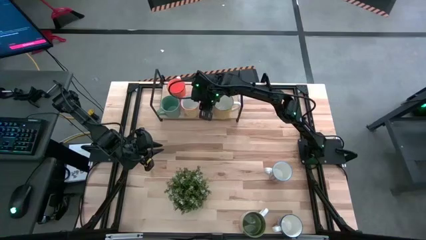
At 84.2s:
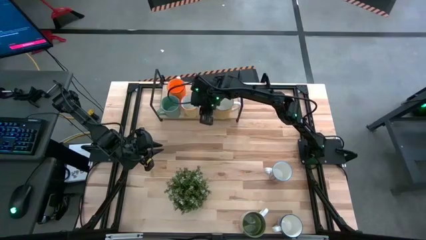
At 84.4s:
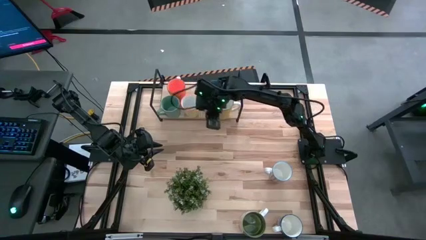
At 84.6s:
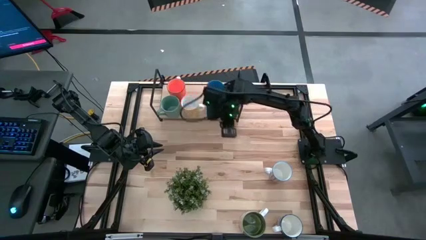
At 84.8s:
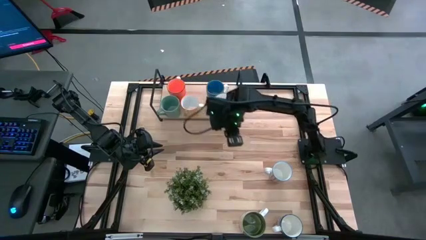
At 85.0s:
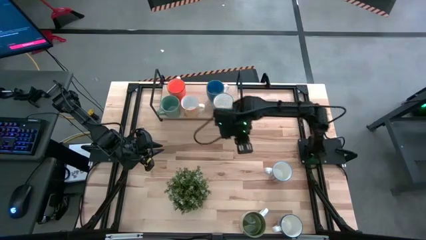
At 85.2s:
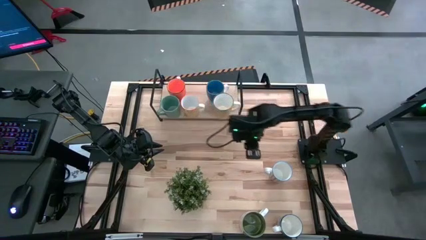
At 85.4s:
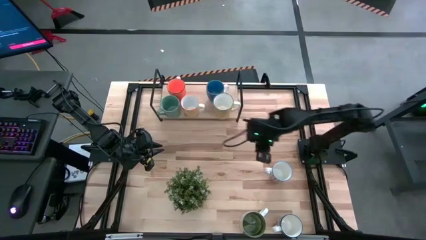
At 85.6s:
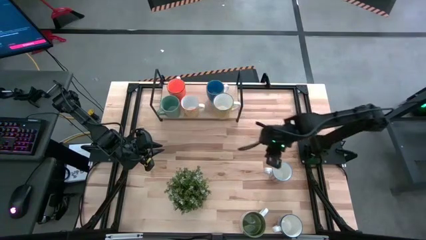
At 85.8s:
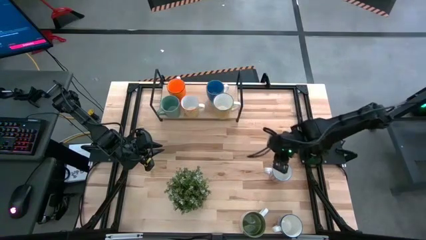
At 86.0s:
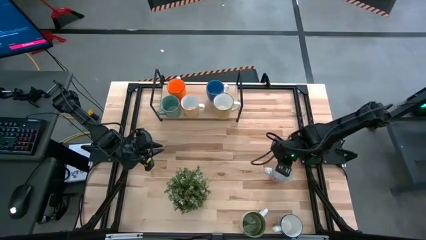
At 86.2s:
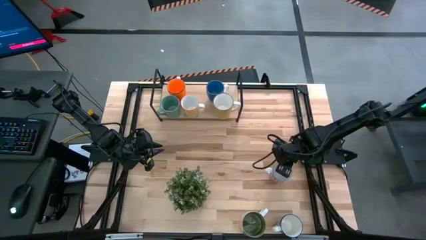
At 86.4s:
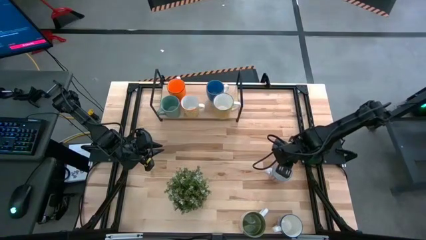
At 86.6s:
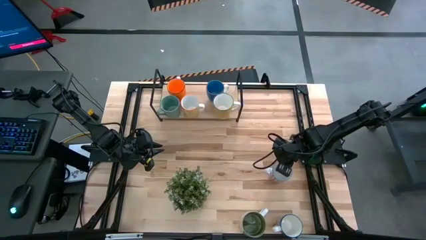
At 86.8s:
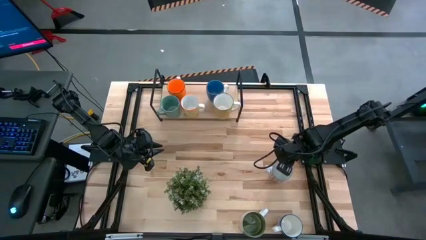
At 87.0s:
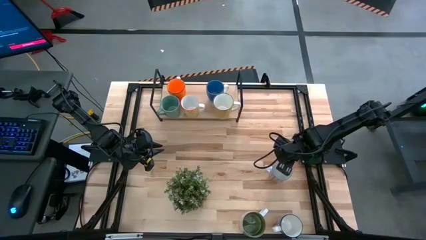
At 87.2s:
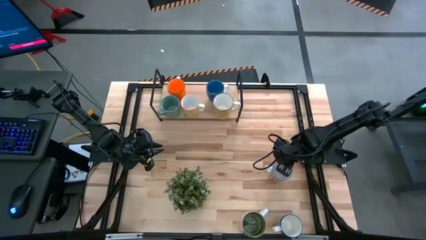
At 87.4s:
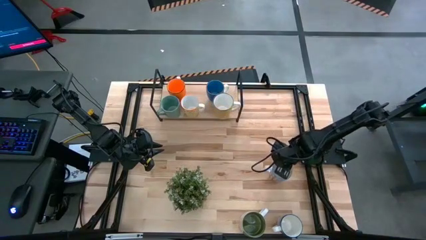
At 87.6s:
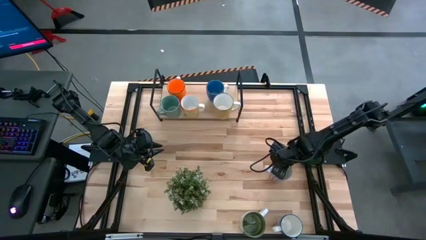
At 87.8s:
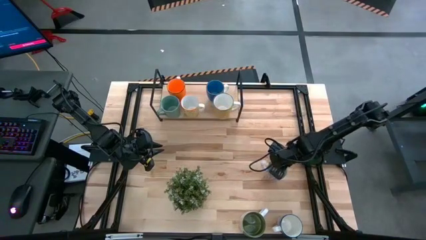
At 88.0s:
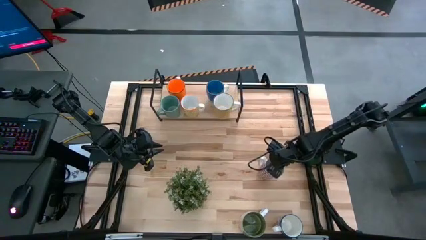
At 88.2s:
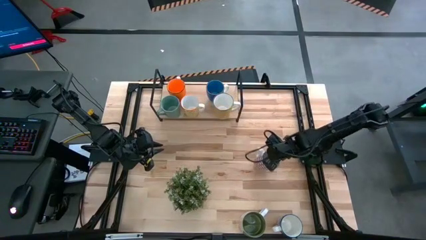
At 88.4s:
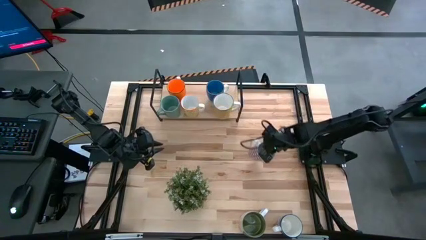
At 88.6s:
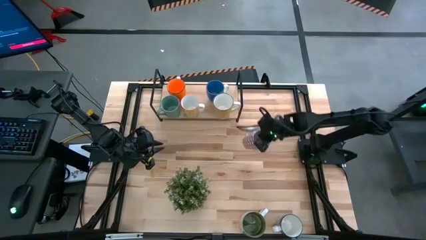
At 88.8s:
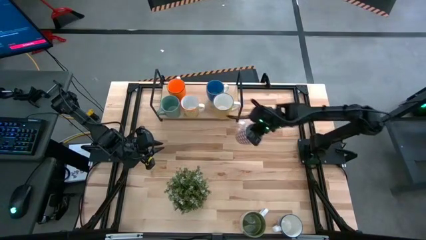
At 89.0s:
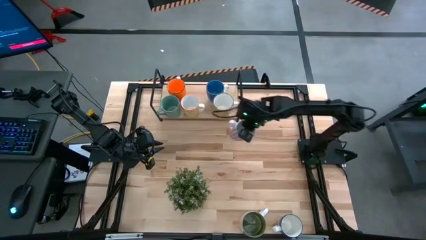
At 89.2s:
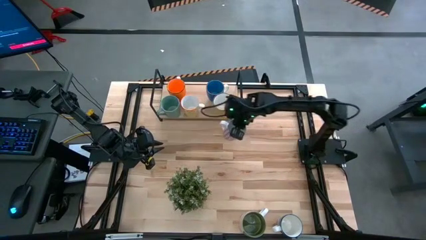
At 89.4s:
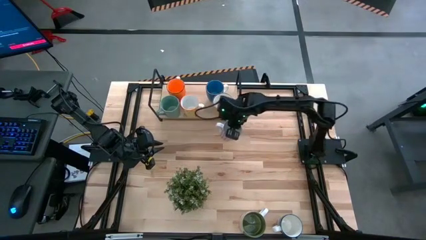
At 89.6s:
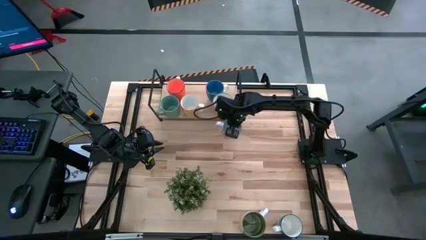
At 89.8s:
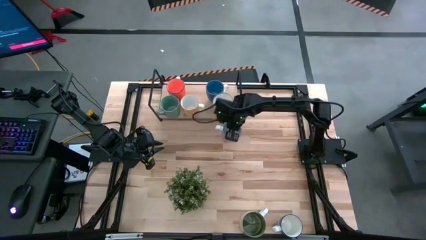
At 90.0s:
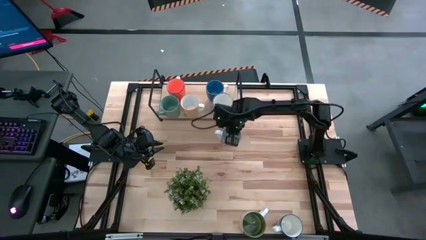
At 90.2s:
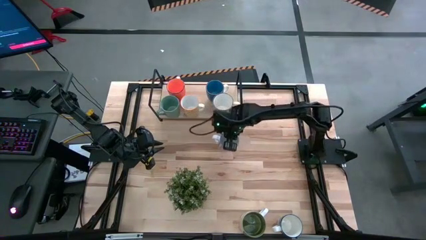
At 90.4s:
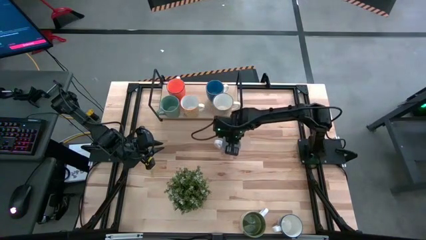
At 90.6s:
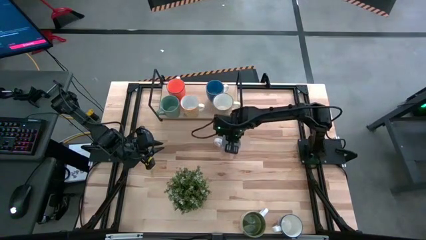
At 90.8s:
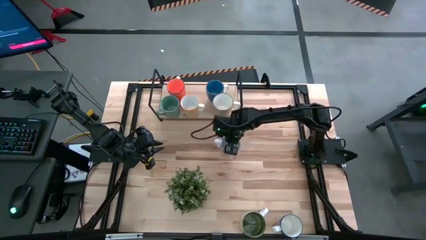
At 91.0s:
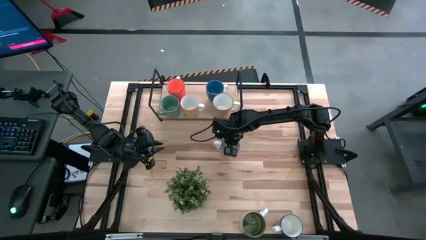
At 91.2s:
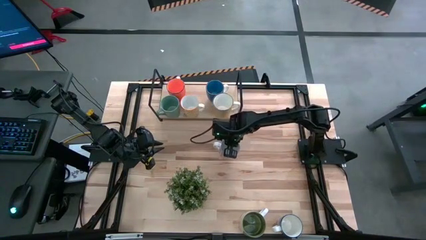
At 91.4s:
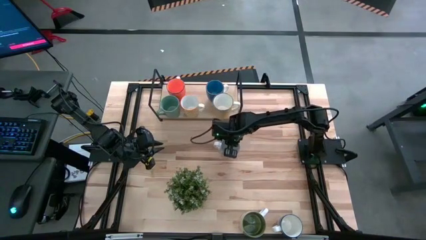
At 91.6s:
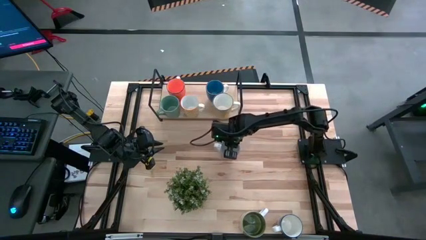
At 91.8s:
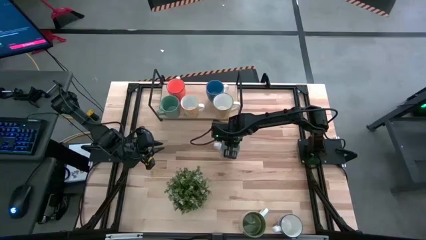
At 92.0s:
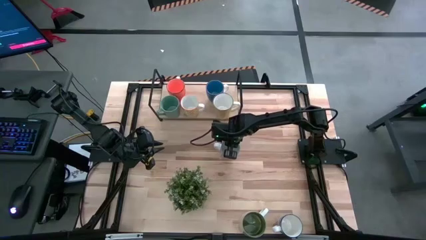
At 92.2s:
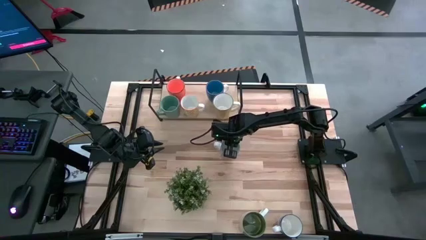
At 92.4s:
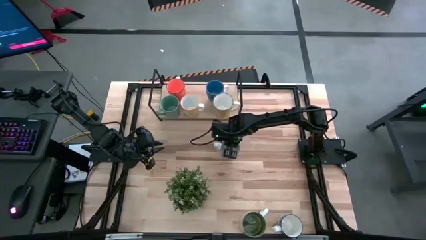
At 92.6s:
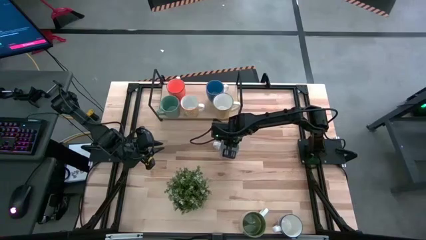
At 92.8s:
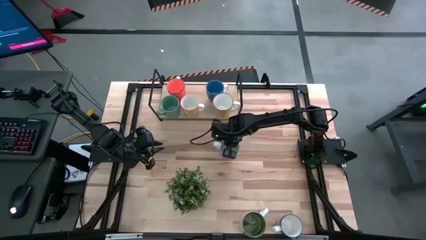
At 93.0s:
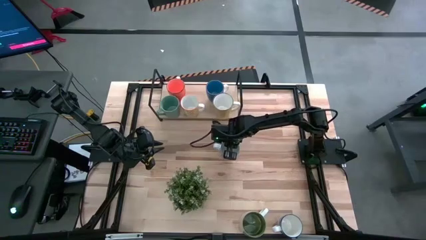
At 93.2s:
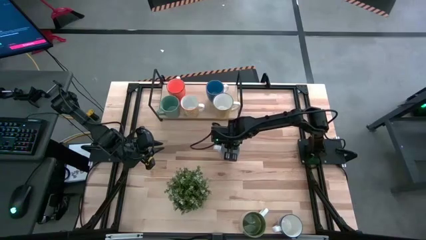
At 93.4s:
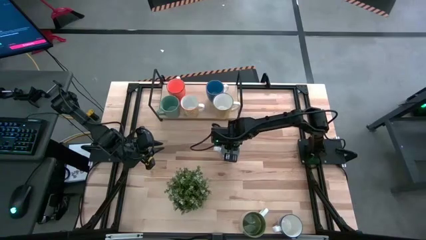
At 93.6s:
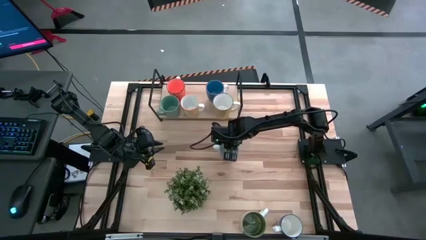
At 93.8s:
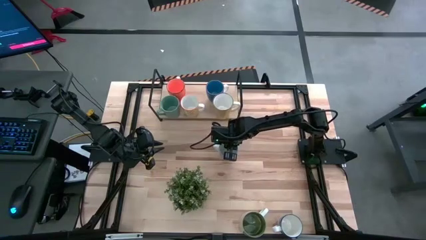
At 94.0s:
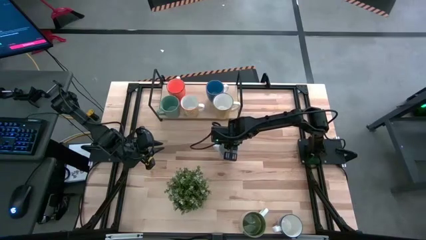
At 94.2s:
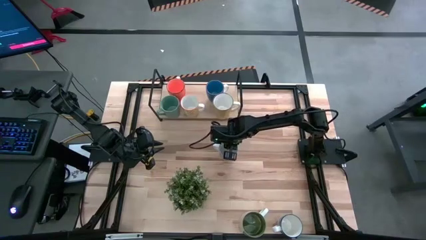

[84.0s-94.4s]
Task: Place coffee mugs
Move the red patterned mug to the middle of the table
